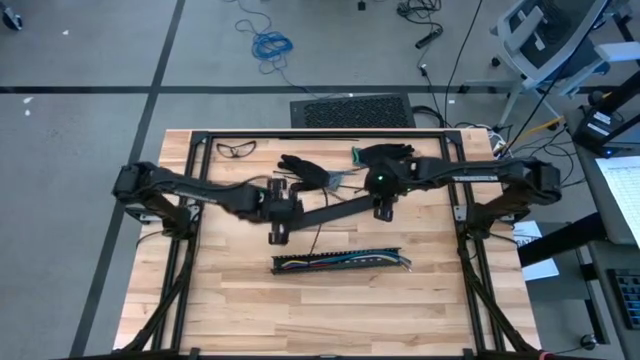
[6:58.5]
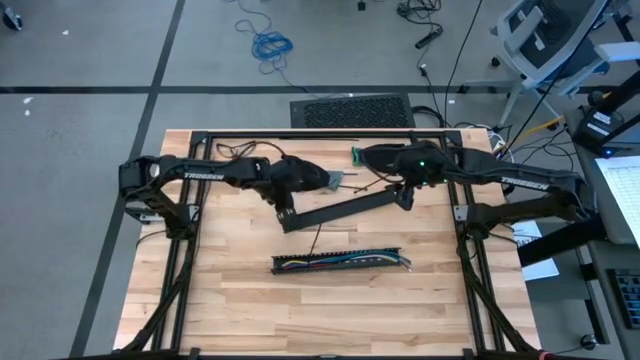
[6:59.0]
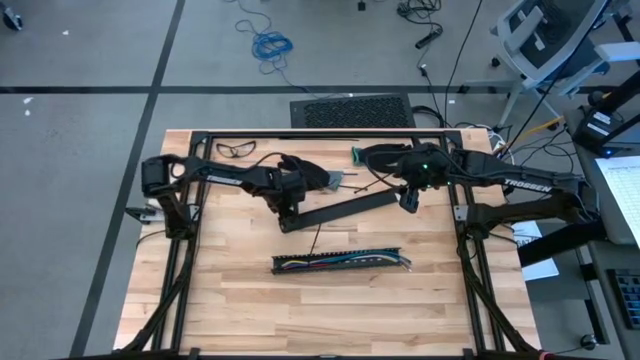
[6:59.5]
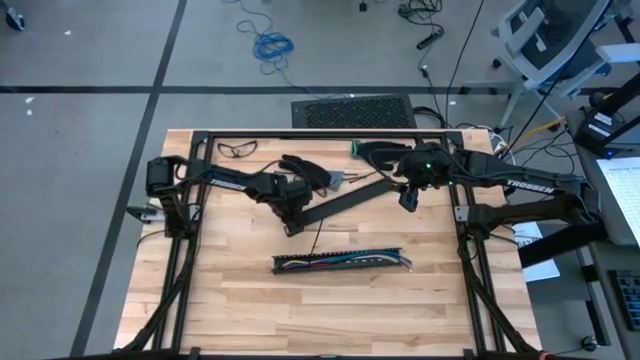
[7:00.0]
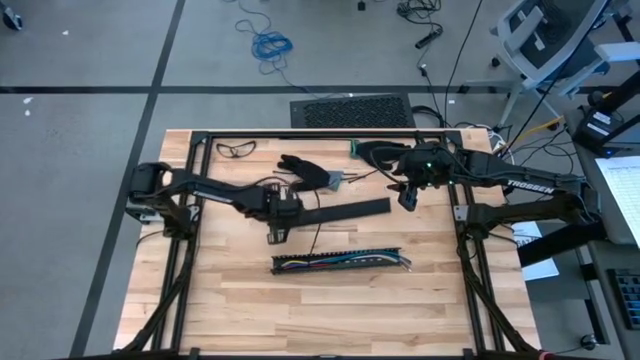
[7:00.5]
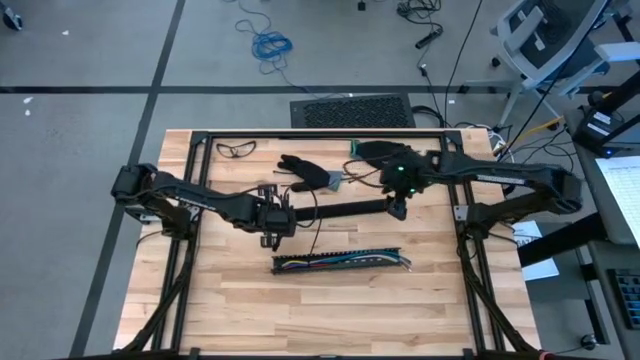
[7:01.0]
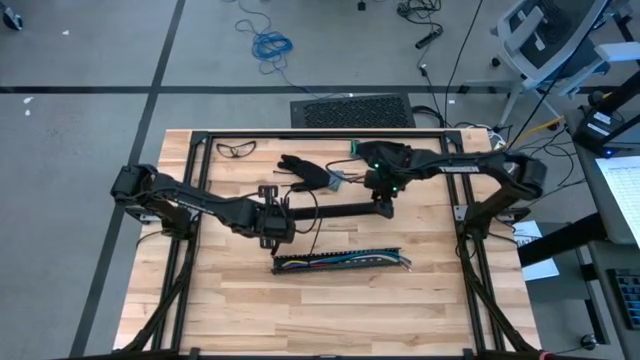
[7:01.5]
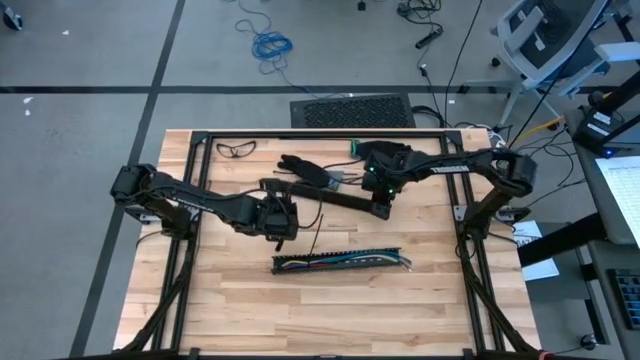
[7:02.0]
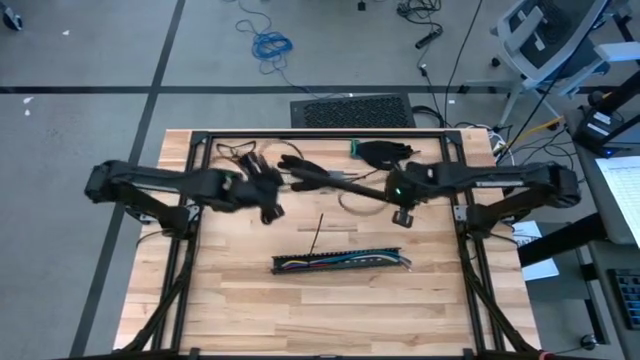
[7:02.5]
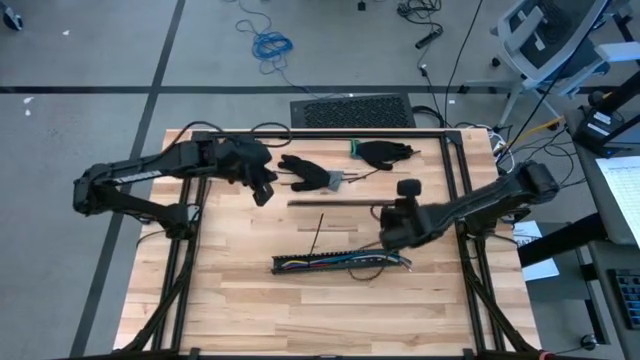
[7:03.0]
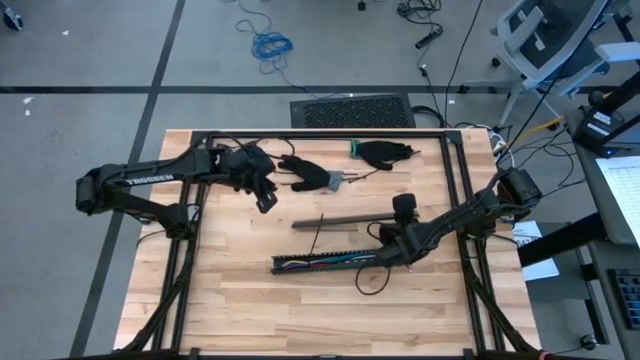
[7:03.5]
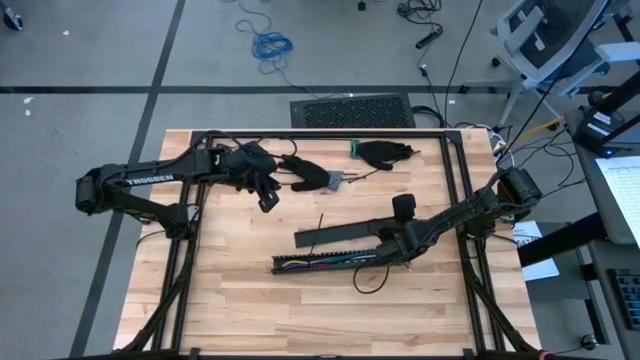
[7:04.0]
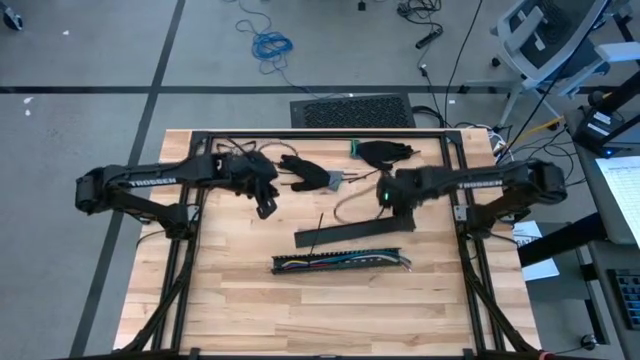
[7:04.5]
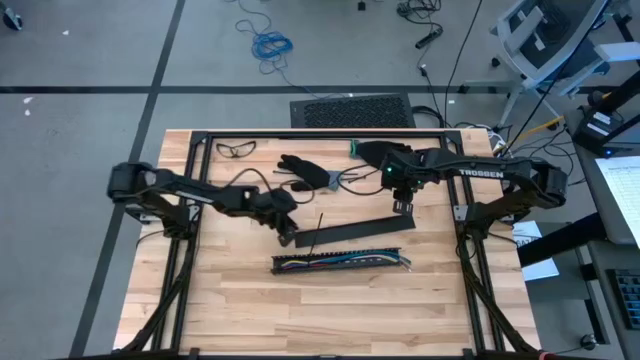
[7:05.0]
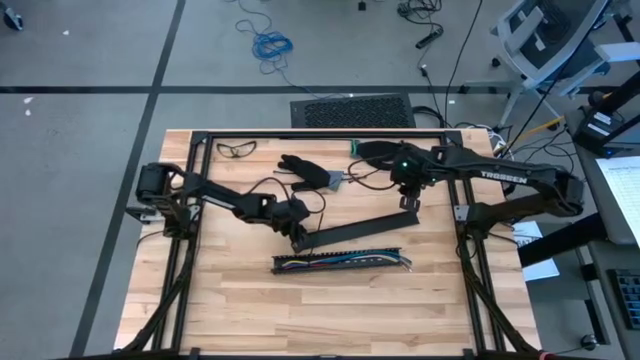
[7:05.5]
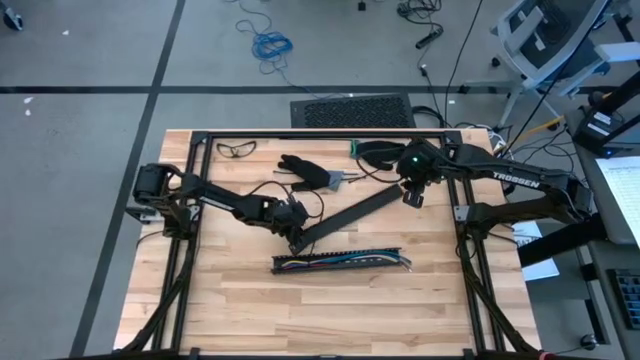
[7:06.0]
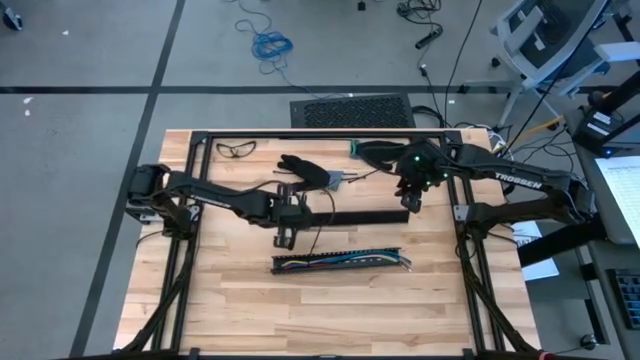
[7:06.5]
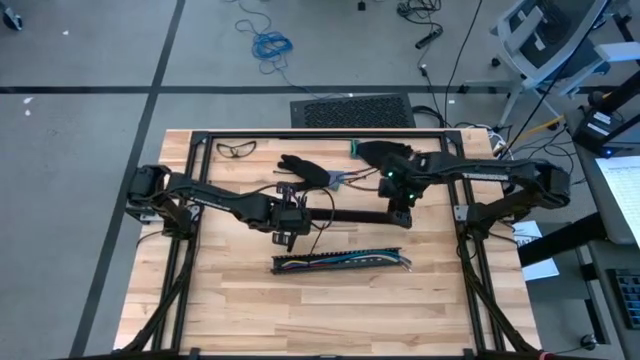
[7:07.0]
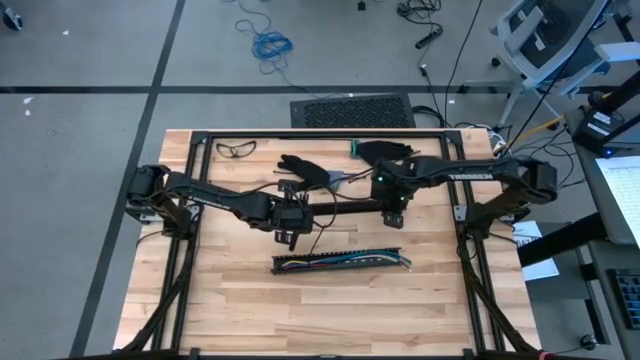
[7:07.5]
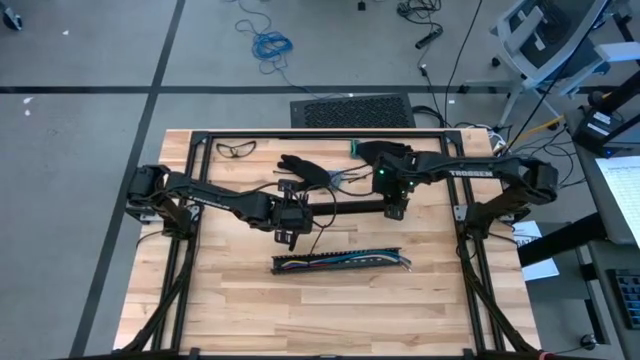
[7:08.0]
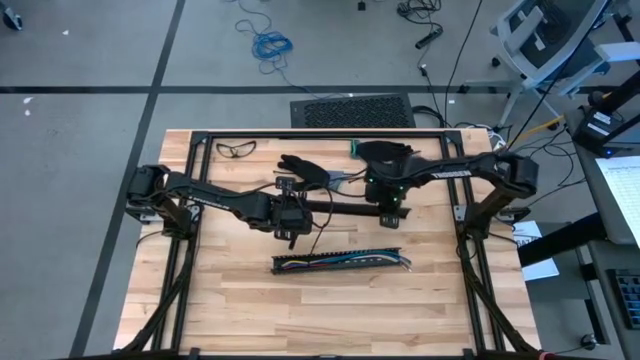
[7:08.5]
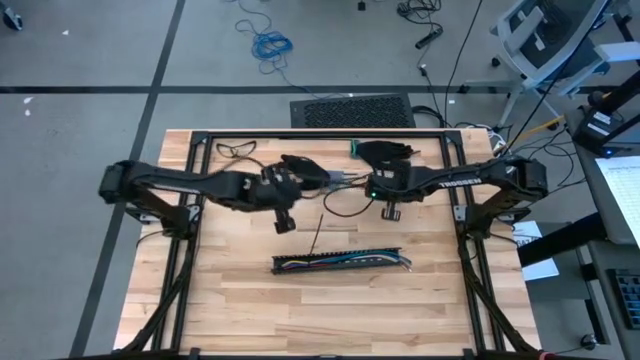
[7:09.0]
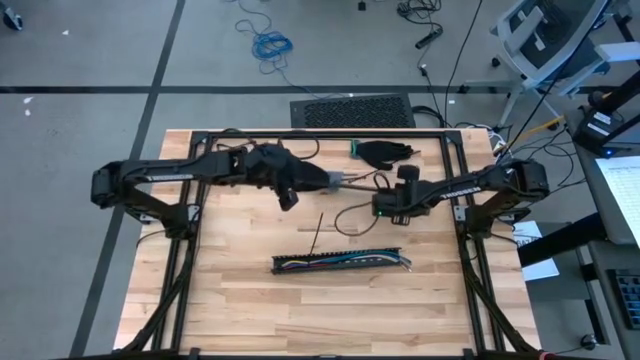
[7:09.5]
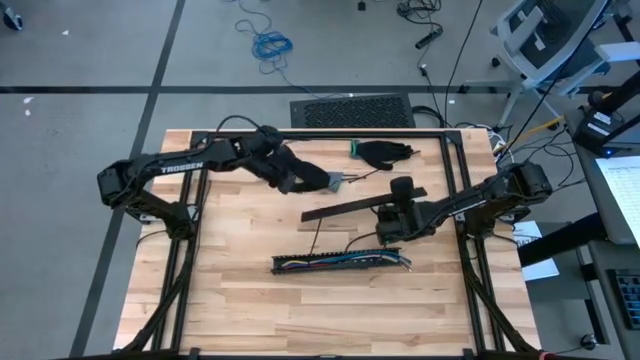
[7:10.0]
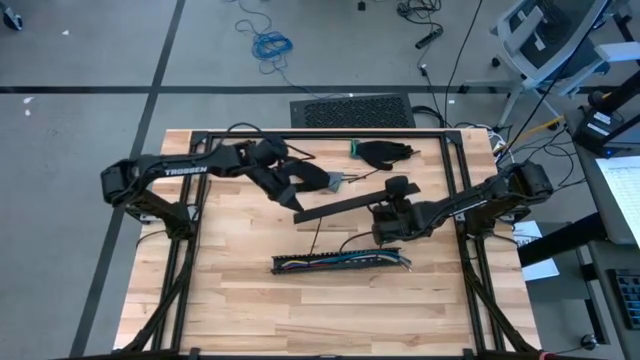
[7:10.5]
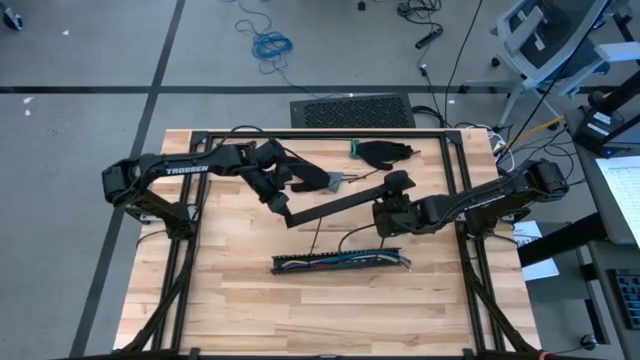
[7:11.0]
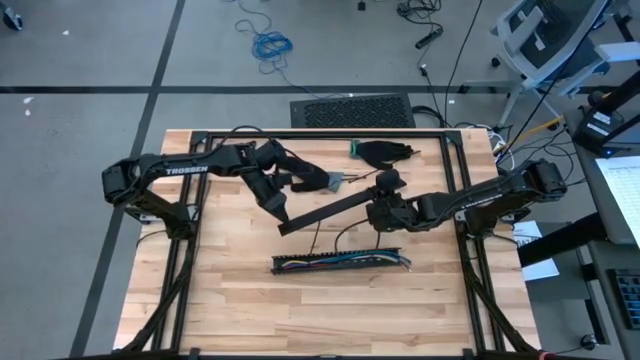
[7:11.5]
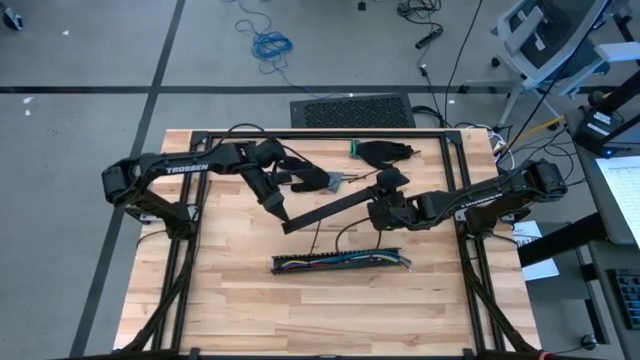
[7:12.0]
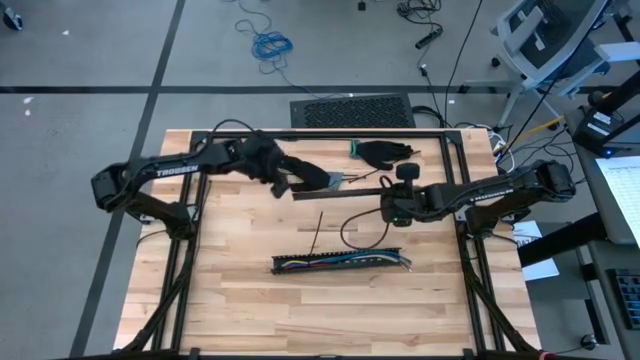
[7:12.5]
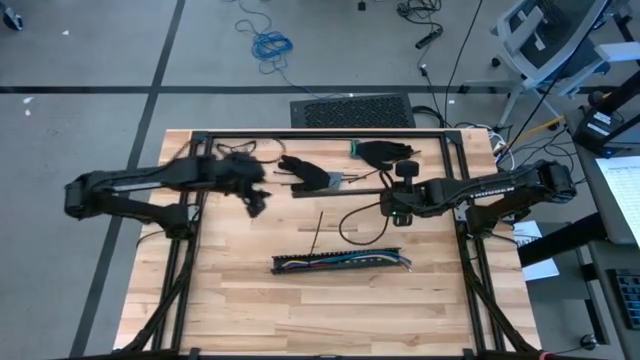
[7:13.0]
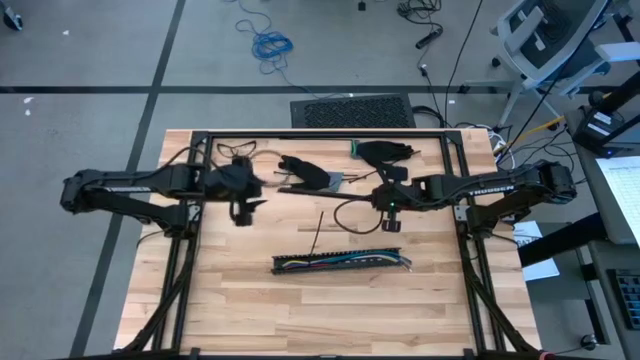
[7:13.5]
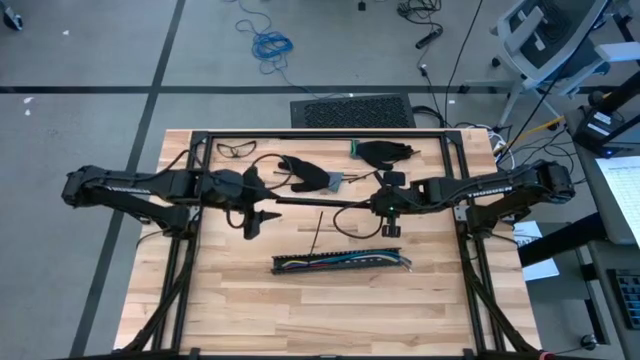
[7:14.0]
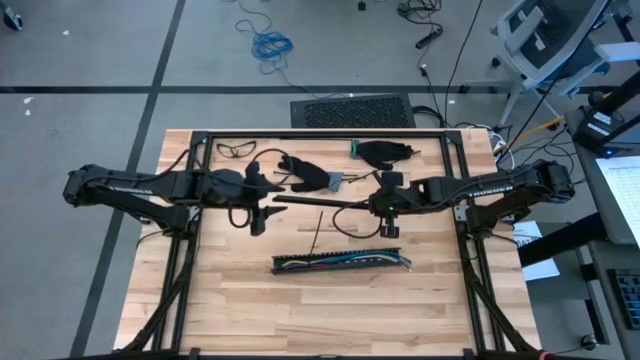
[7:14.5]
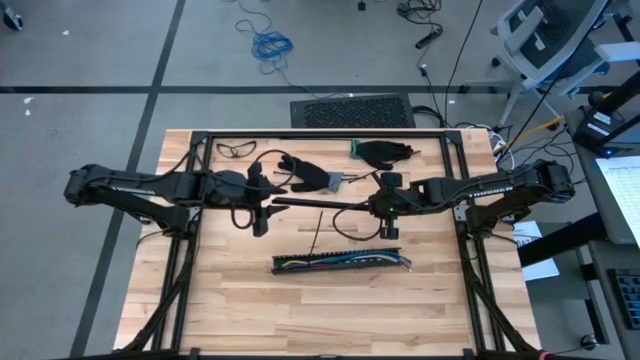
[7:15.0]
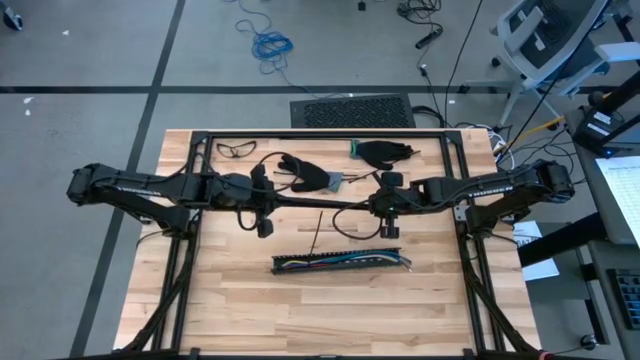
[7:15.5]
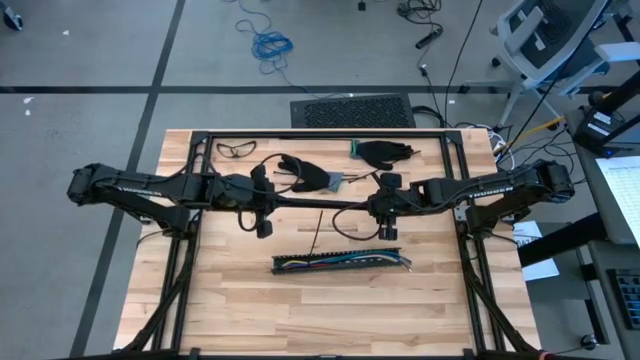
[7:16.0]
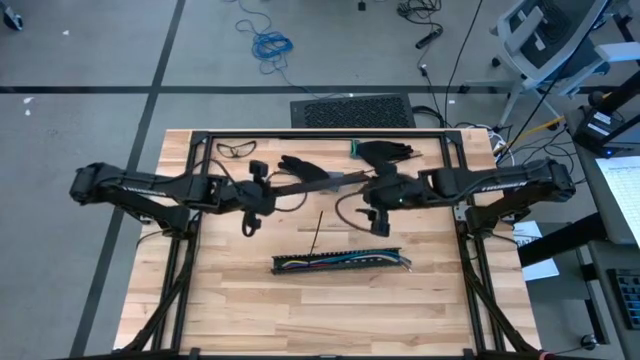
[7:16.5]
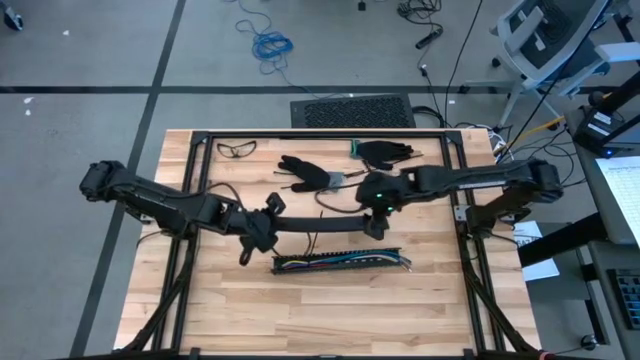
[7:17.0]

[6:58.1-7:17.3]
Task: Ziptie cables
Insert the black cover of the black cable duct

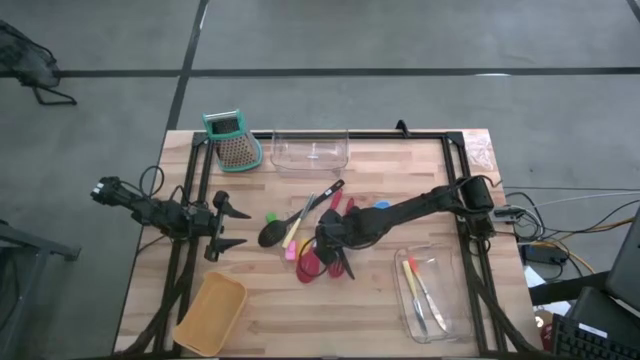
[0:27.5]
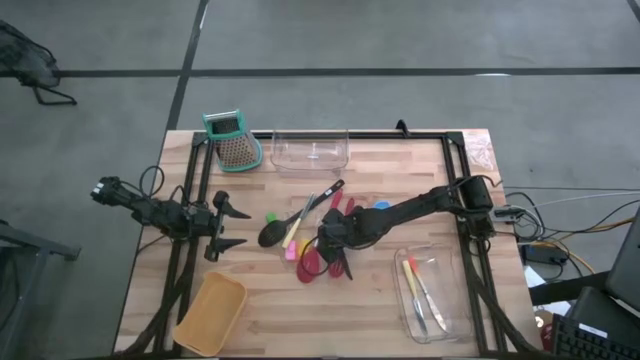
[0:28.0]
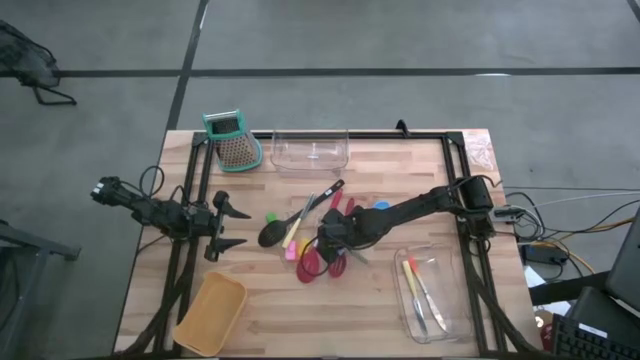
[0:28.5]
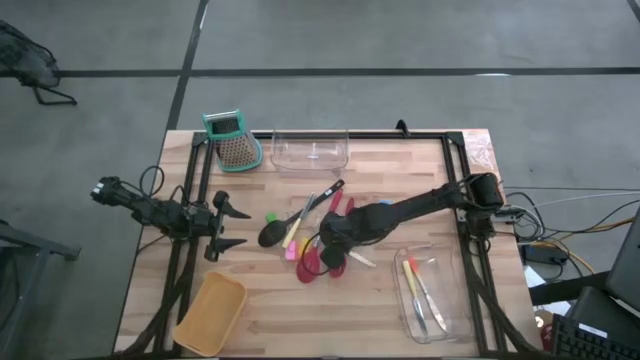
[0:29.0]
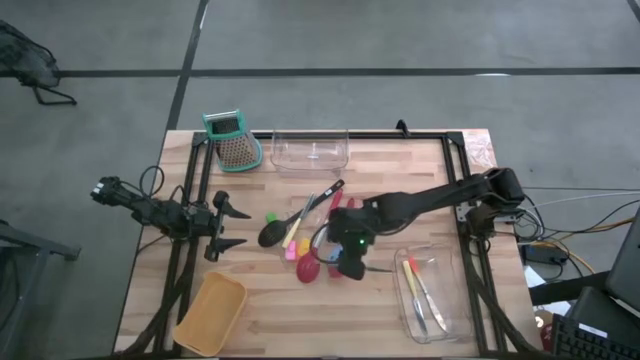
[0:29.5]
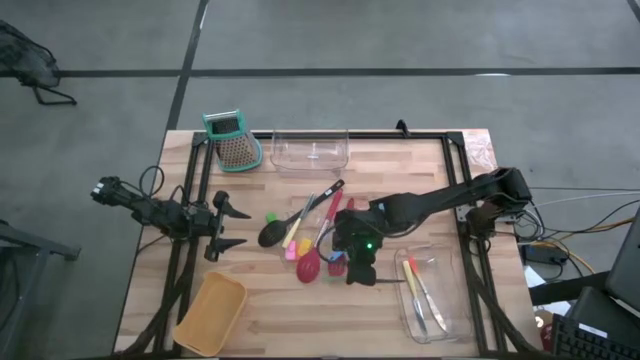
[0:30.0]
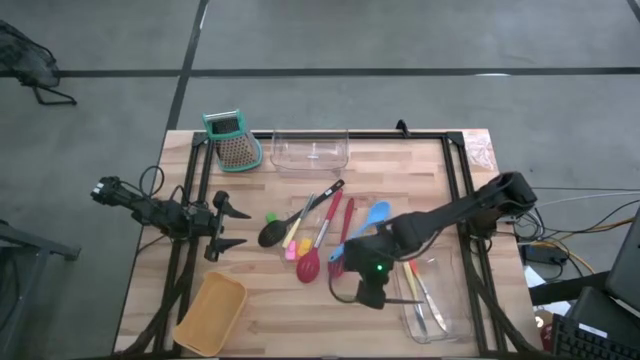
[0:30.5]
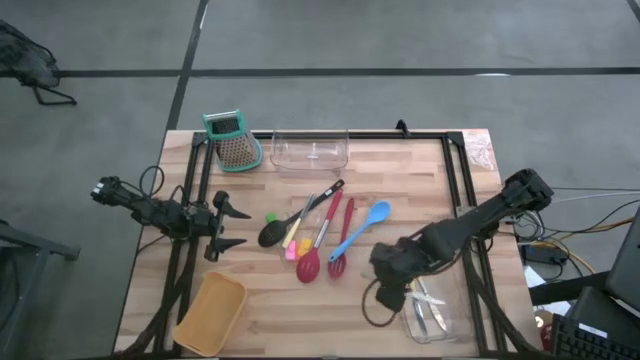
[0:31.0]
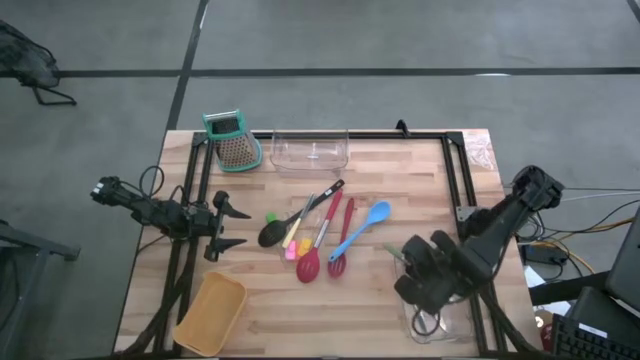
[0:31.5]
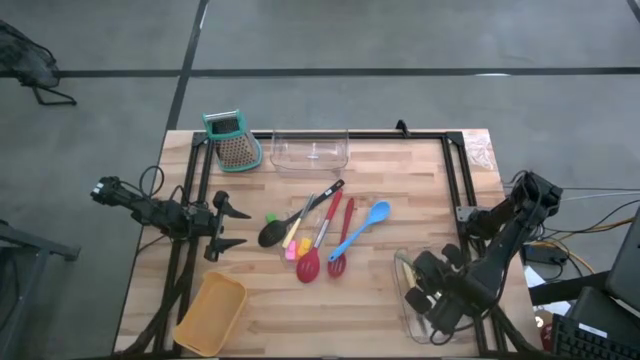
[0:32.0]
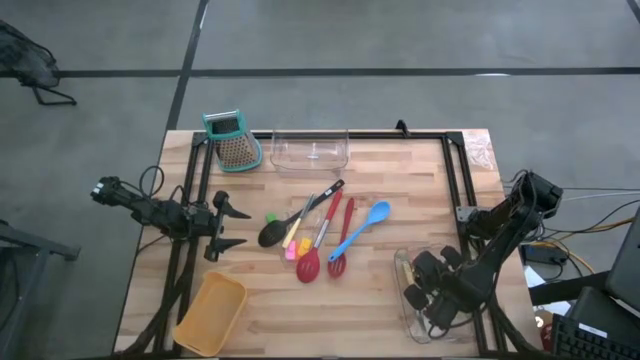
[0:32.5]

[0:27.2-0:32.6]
Task: Pick & Place Kitchen Items
Put the green knife into the bottom transparent bin
